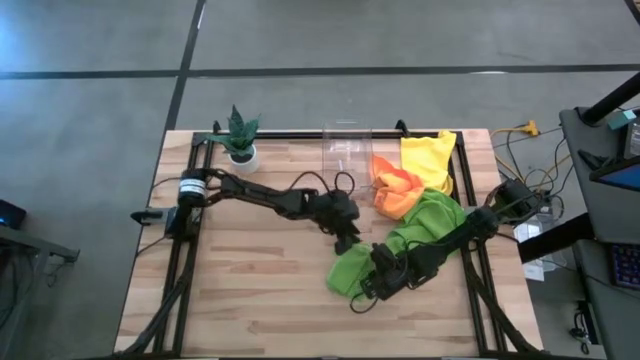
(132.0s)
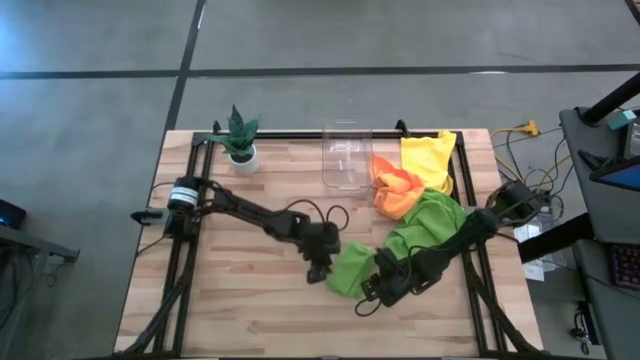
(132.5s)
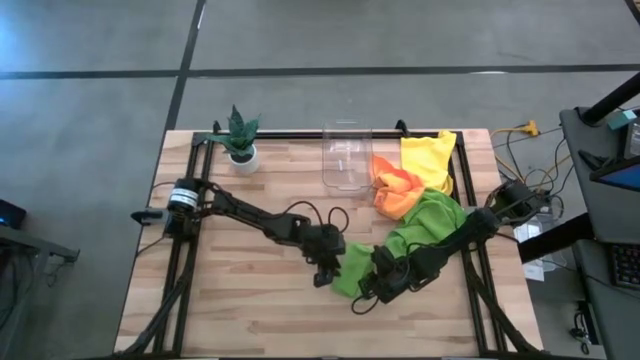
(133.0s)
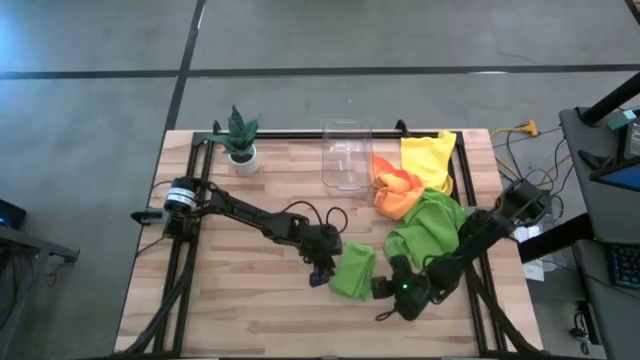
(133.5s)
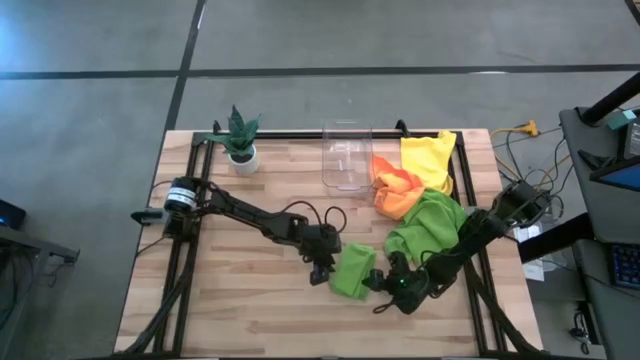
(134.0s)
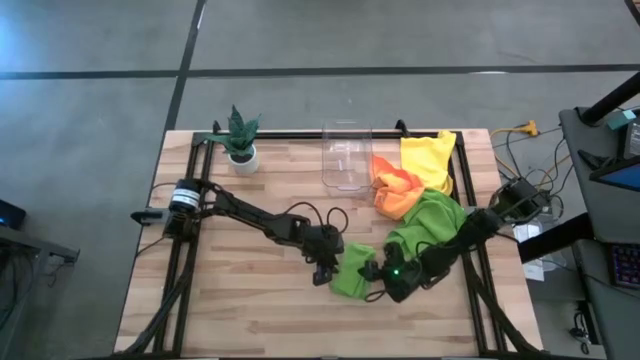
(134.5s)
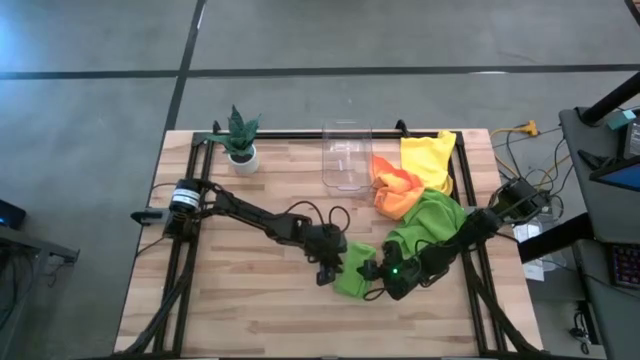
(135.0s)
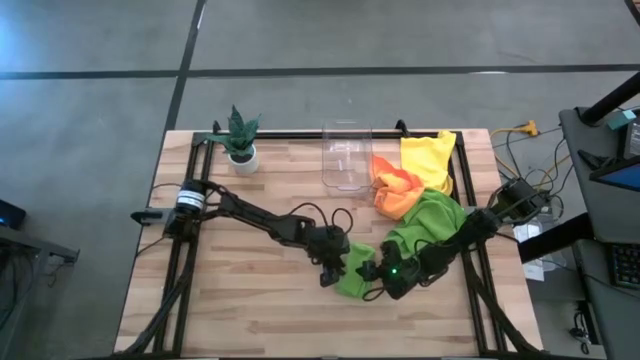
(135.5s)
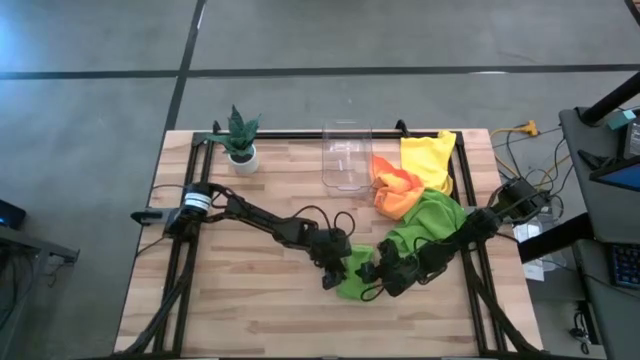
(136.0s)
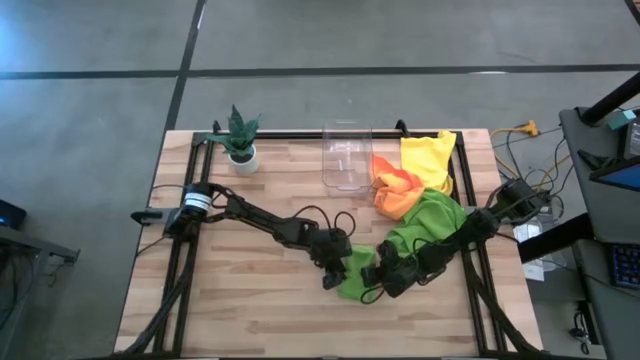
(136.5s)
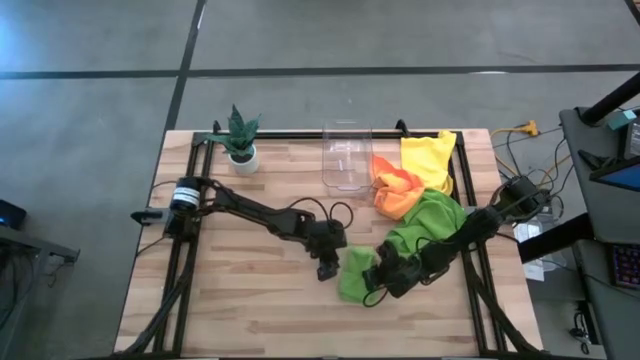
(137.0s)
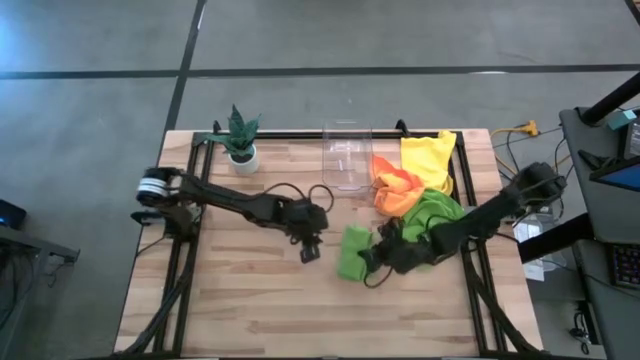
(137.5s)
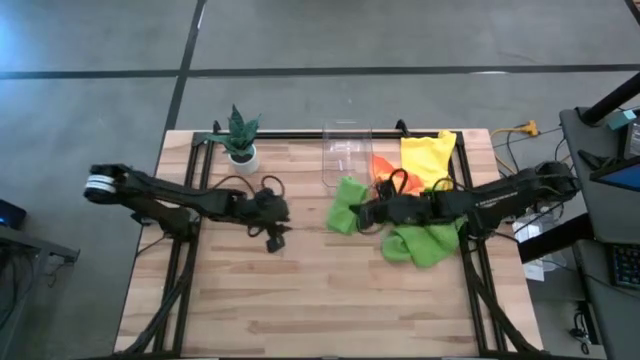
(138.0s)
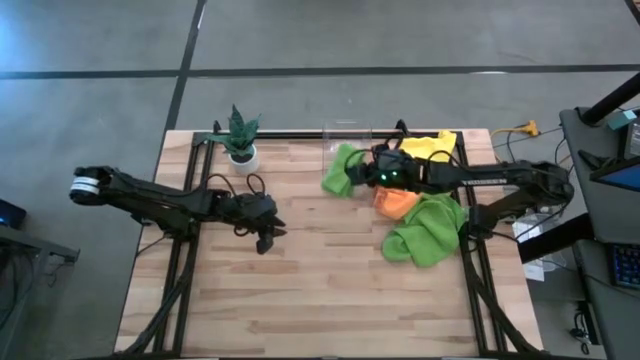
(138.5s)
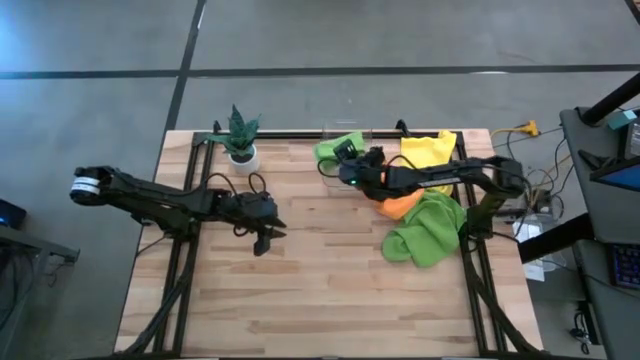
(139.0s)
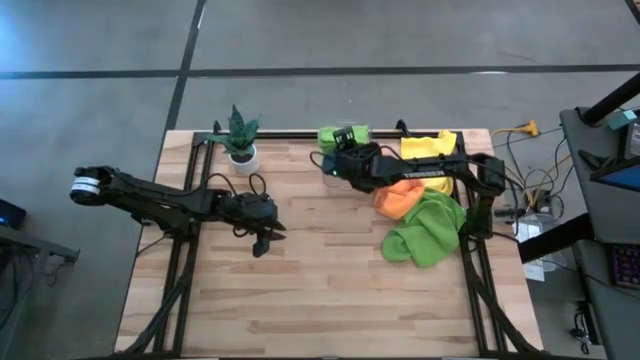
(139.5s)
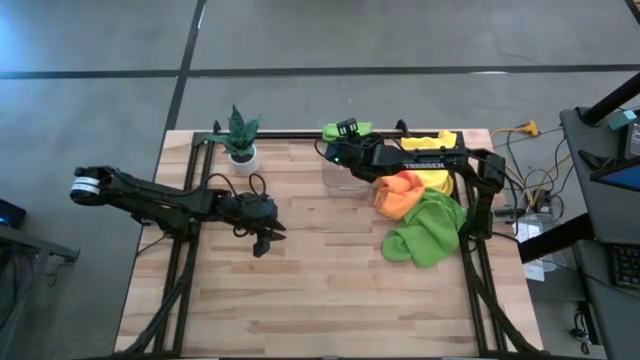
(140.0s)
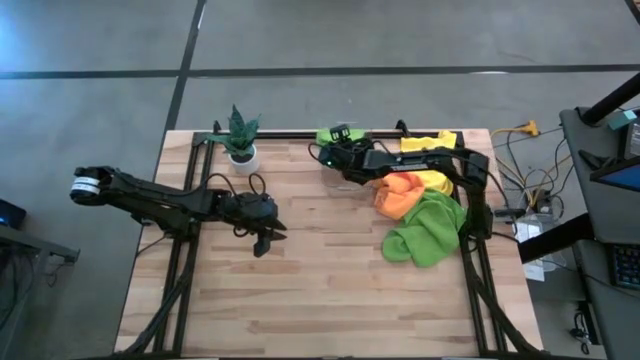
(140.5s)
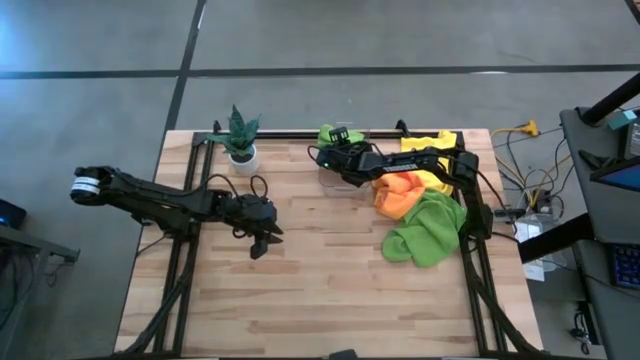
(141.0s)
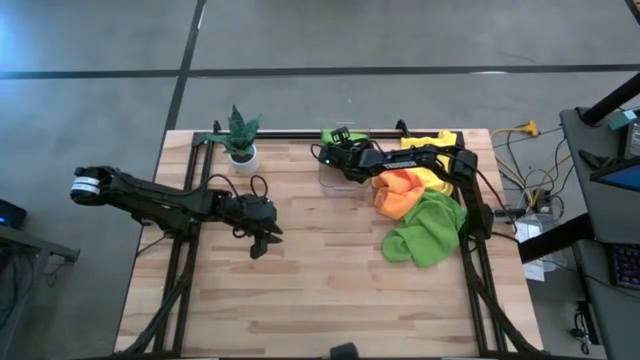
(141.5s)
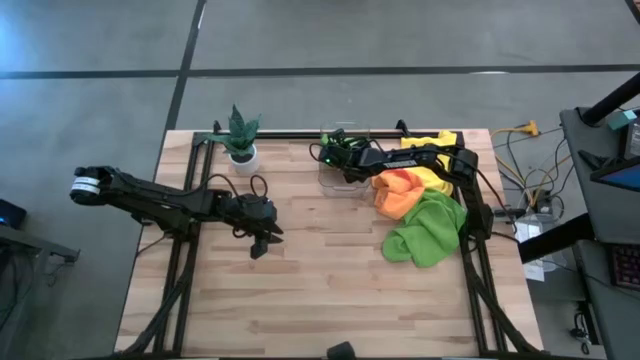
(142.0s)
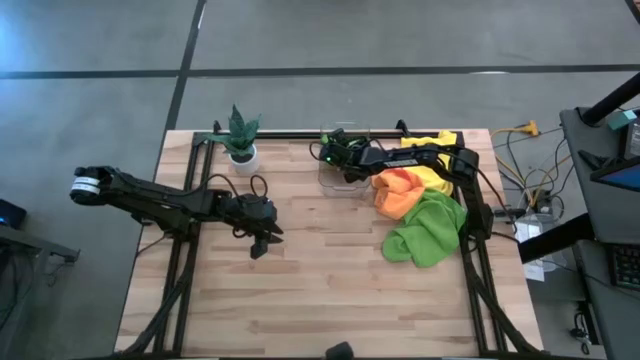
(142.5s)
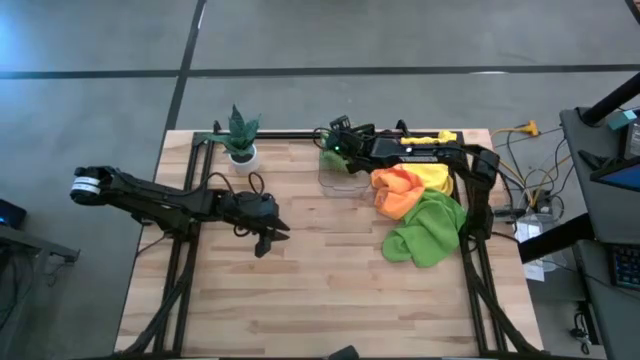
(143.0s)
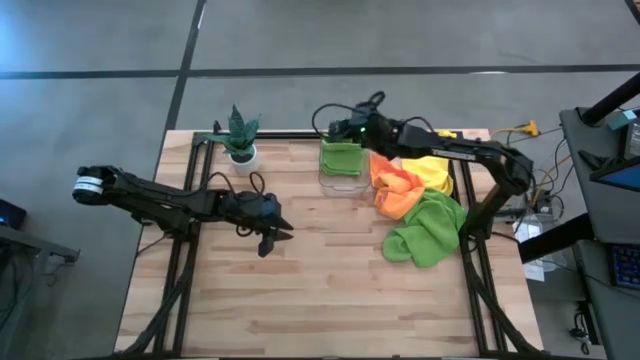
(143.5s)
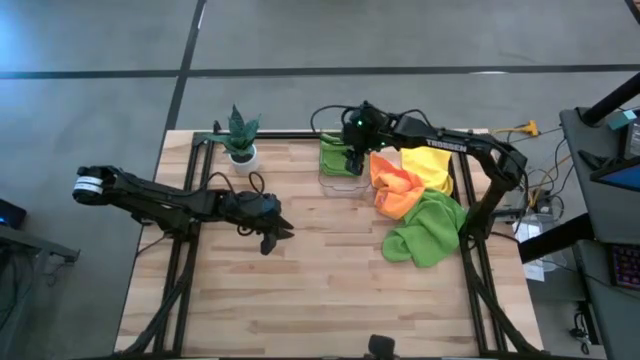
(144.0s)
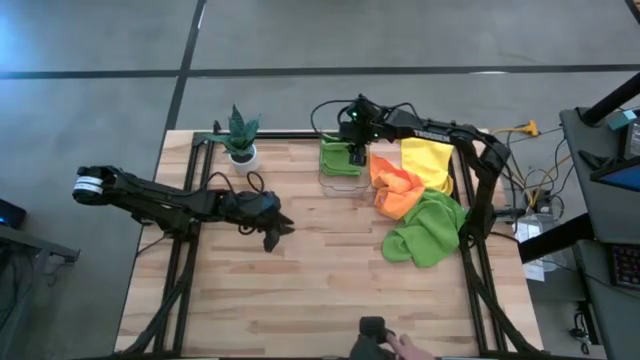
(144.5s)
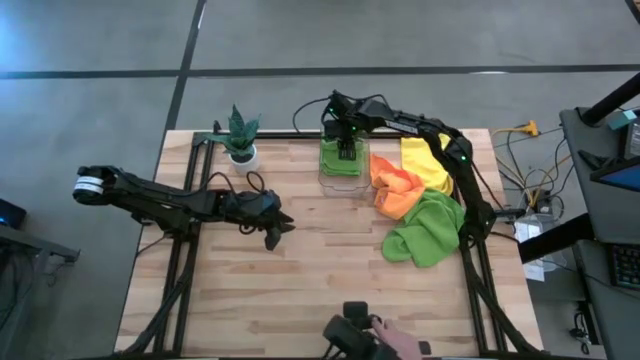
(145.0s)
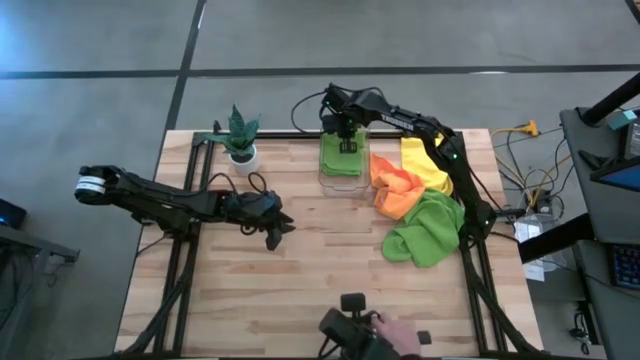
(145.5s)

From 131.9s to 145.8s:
Task: Fold microfiber towels
Put the folded top green towel into the transparent bin

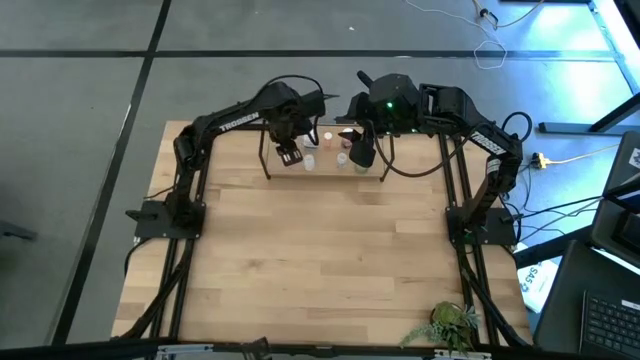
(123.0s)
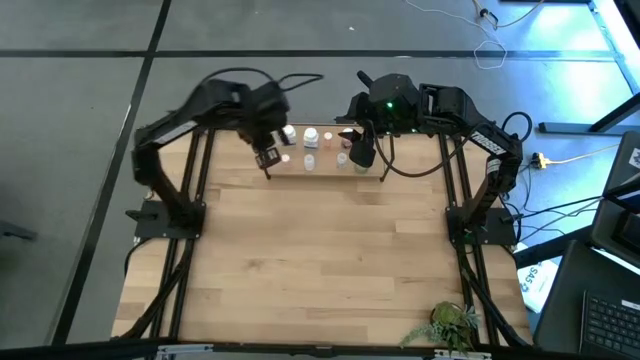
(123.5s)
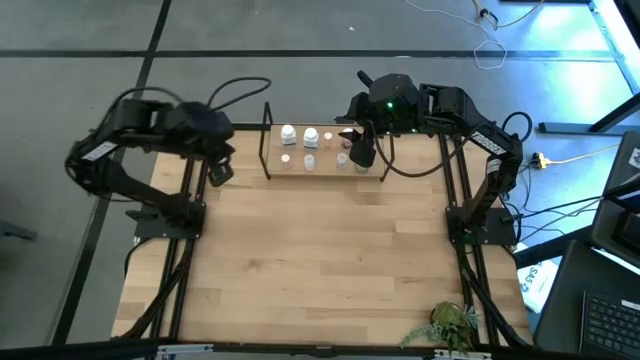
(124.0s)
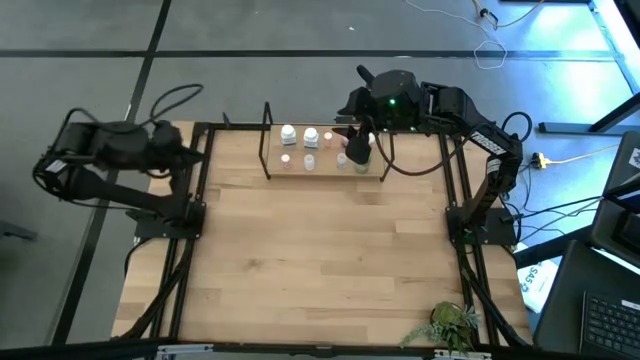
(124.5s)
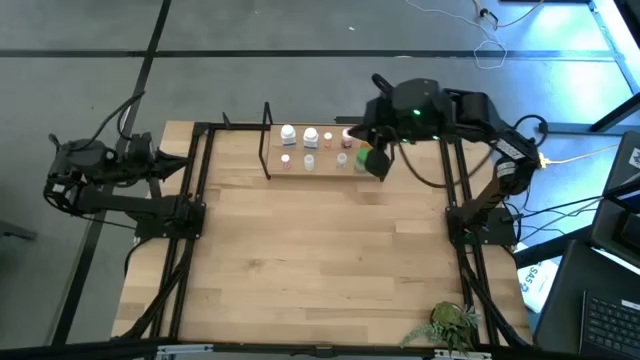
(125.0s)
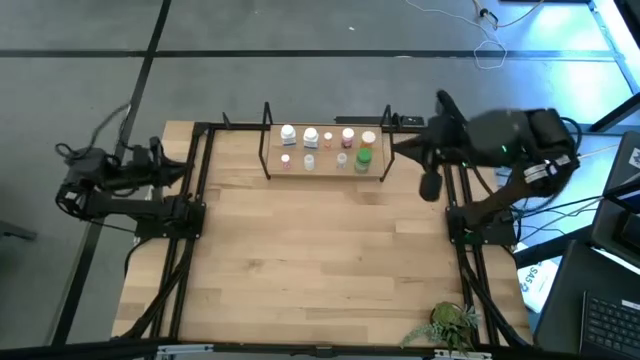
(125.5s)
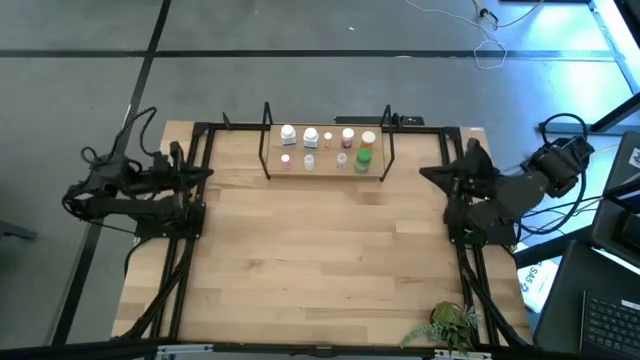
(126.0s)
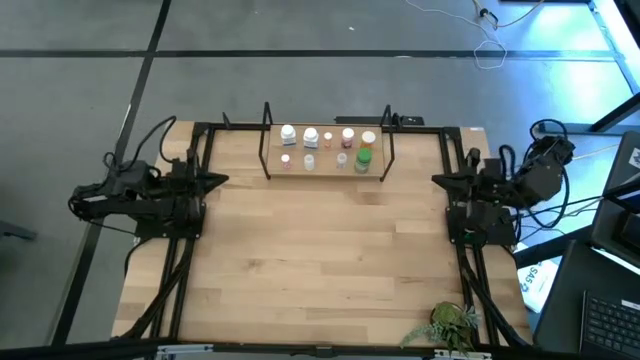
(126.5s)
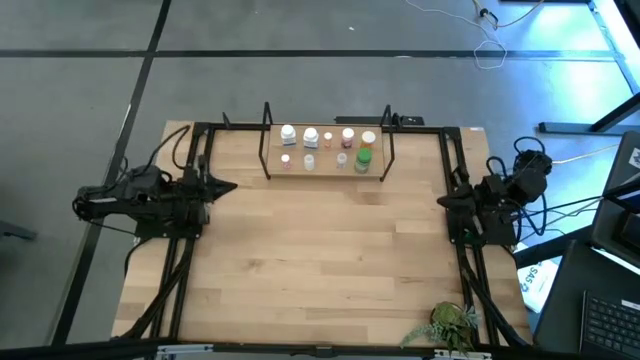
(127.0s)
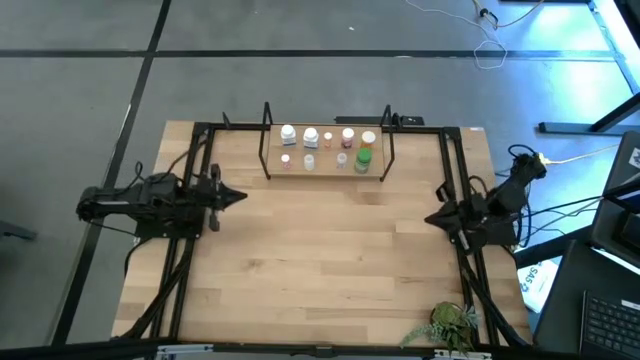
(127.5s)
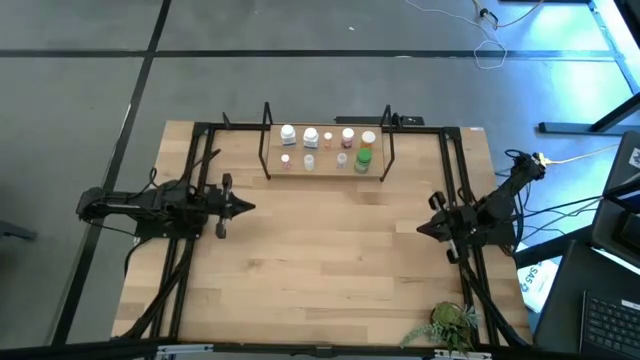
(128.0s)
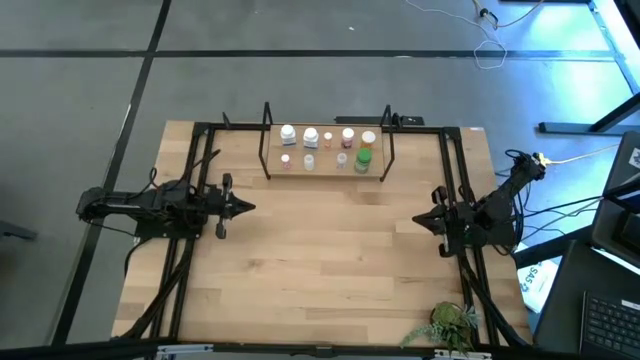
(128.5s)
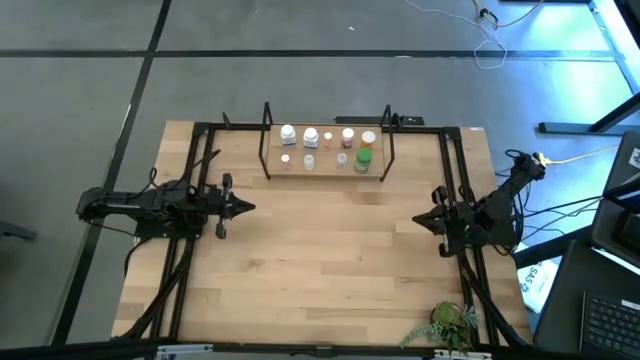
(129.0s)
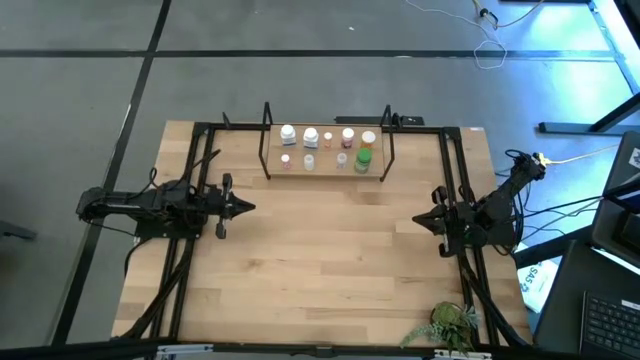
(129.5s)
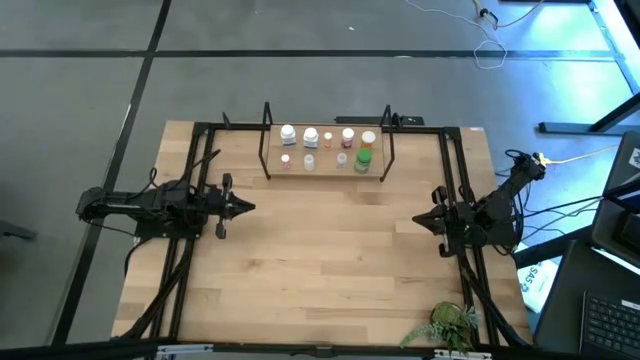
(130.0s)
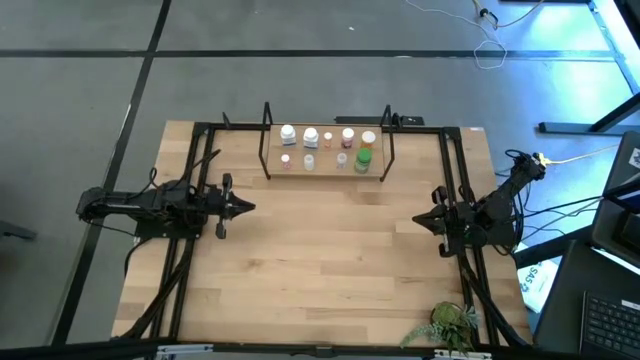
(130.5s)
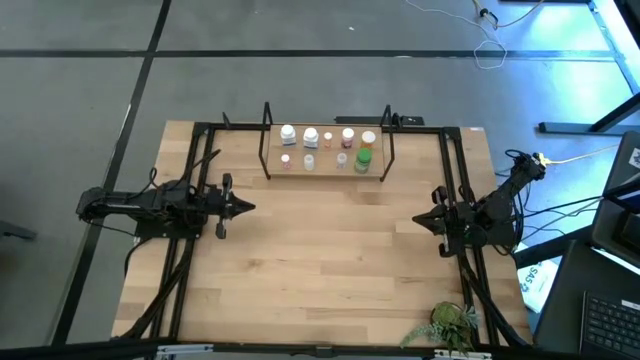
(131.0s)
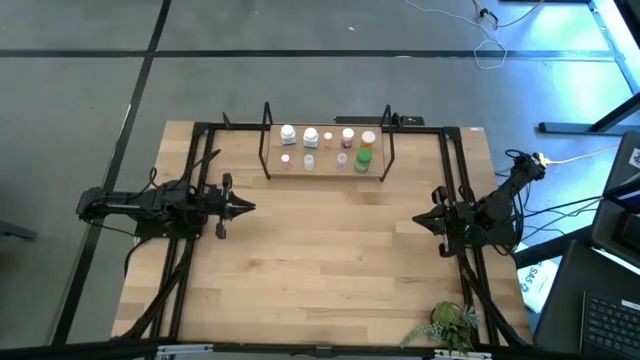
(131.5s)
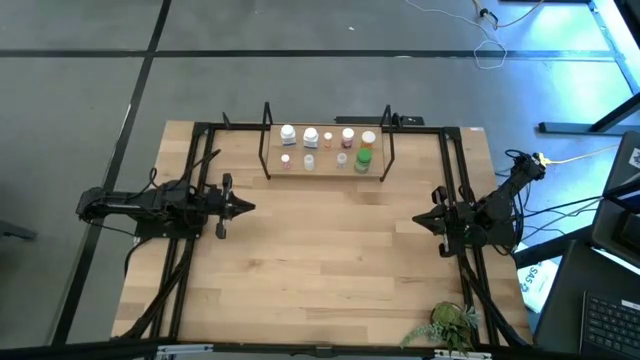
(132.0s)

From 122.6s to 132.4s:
Task: Pick and place medicine bottles onto shelf by color
Return to Home Position
